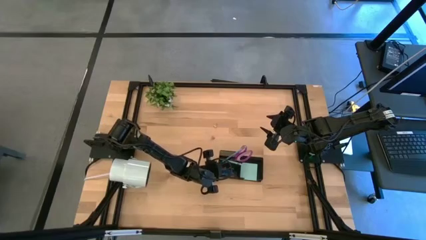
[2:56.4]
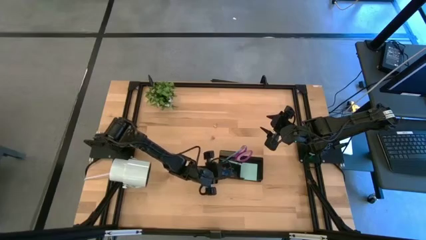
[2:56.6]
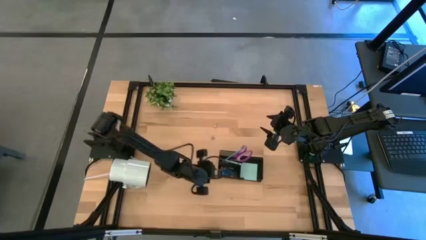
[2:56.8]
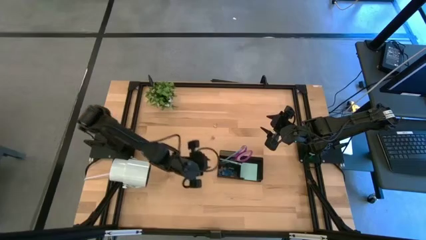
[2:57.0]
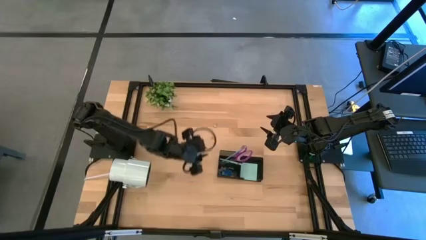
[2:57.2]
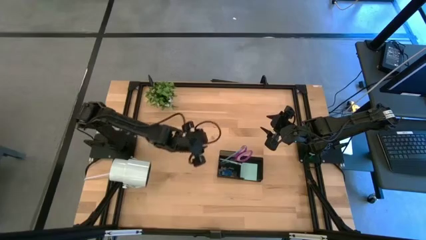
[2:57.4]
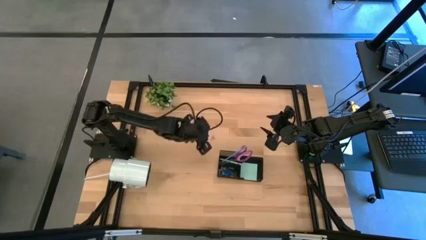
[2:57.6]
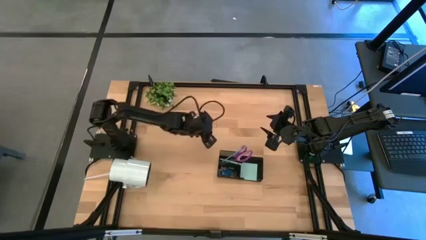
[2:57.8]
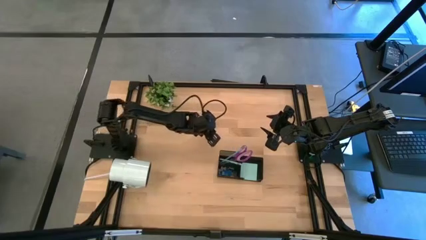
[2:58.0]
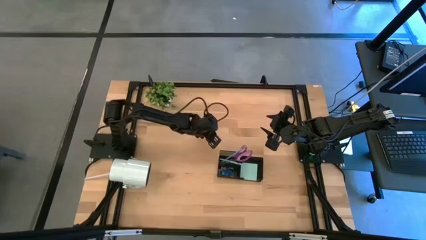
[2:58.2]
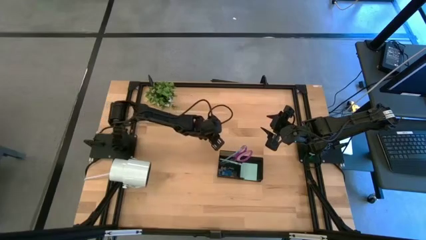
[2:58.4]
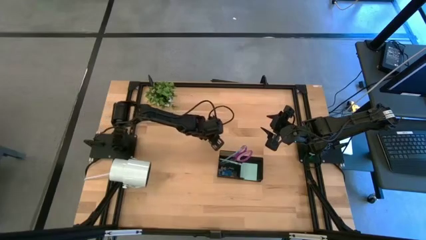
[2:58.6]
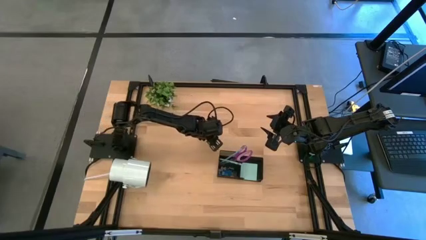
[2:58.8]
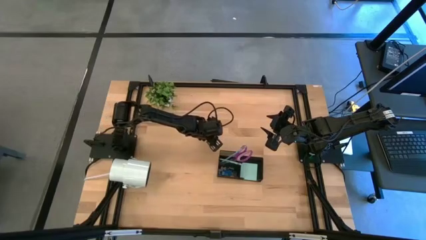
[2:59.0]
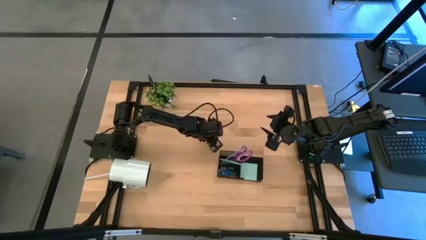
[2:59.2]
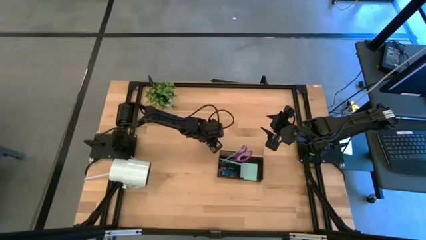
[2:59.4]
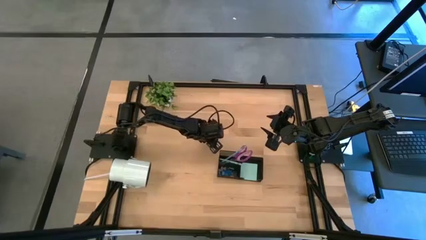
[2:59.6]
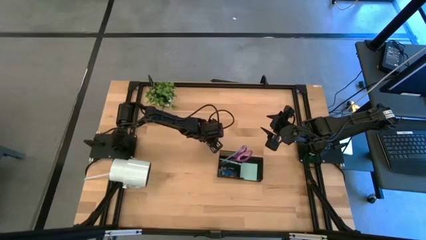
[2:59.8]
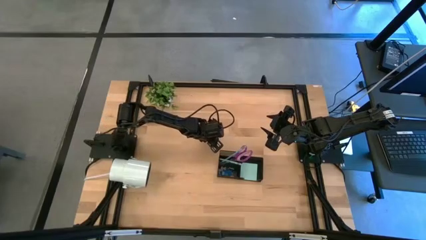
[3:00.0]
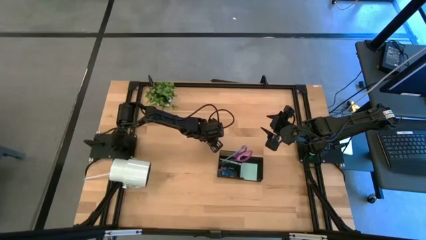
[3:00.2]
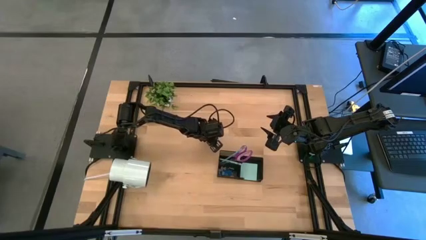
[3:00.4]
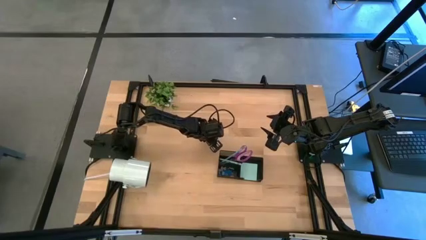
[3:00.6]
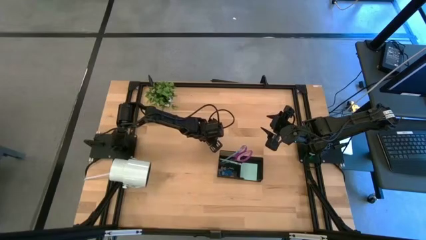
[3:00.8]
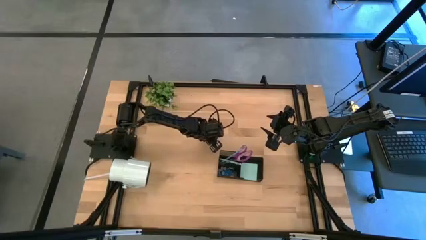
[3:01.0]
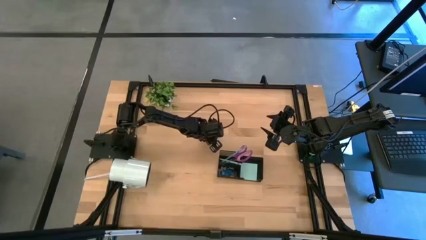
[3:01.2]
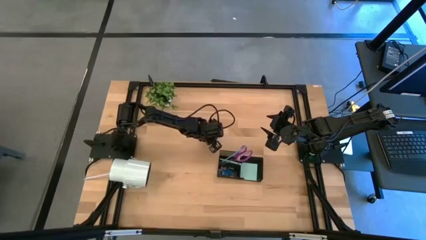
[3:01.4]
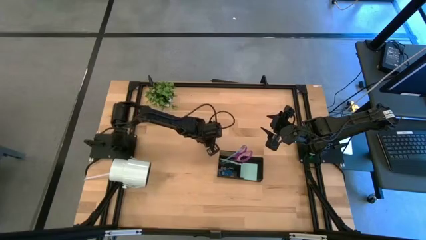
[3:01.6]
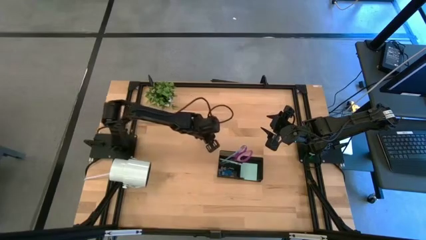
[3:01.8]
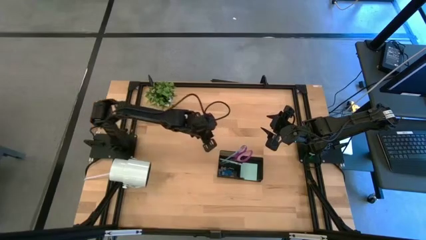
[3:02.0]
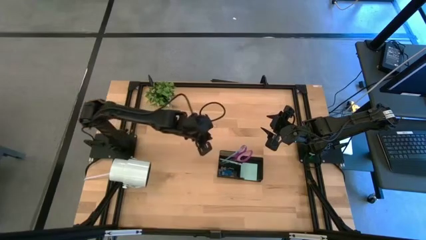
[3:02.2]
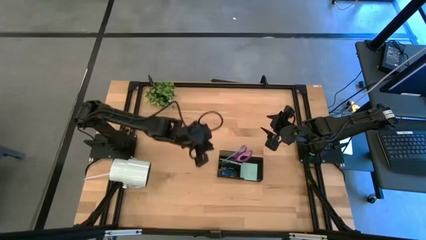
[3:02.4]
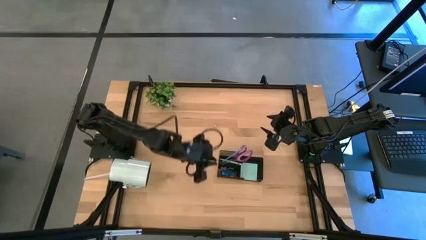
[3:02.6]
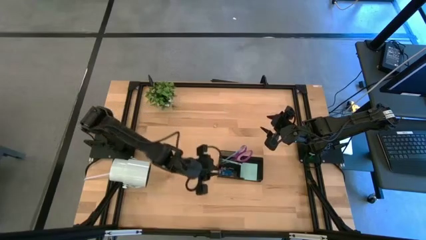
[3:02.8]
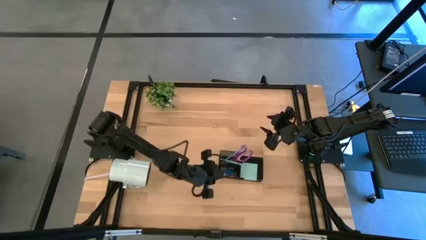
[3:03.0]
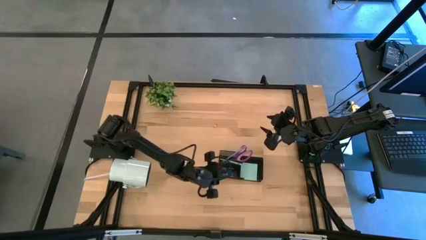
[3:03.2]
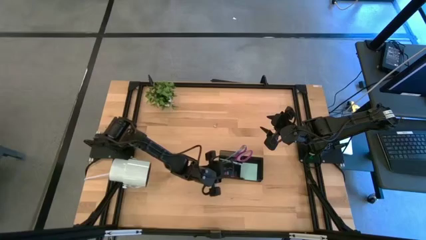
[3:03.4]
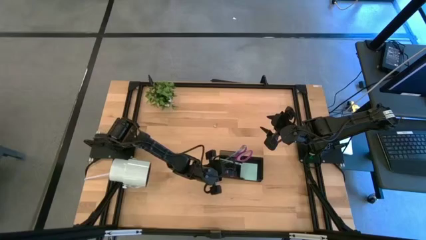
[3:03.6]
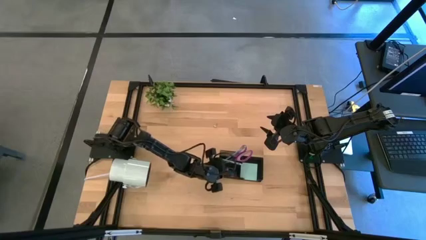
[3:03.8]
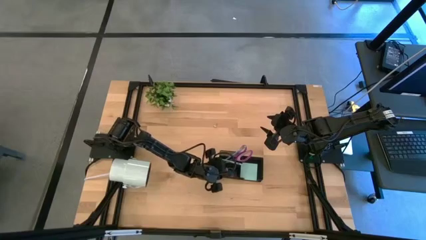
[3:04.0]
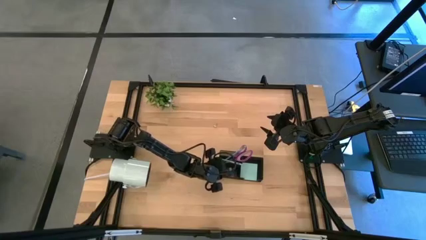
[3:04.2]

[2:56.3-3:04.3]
Task: Pick and place office supplies into organizer
Put the pink binder clip into the desk organizer

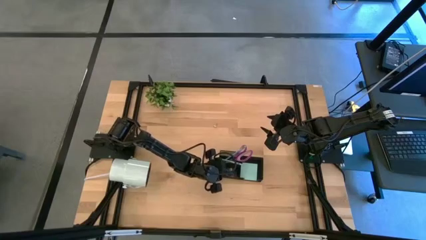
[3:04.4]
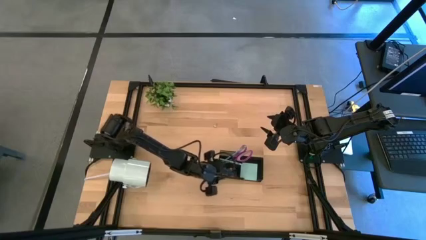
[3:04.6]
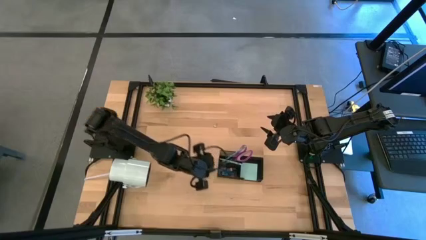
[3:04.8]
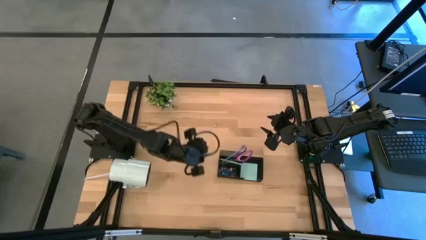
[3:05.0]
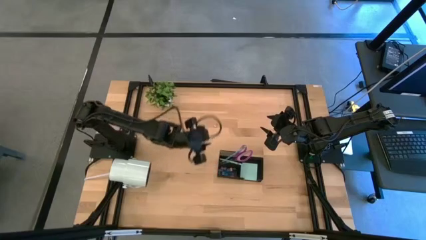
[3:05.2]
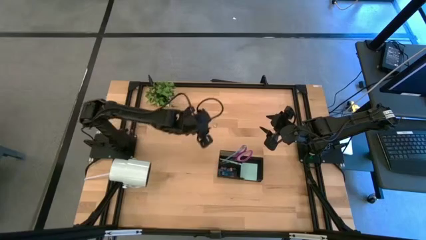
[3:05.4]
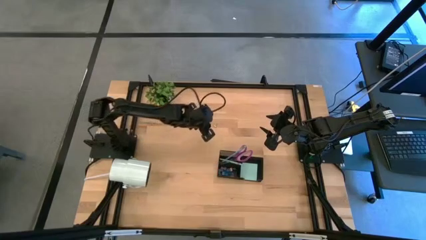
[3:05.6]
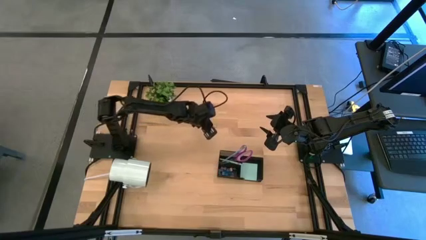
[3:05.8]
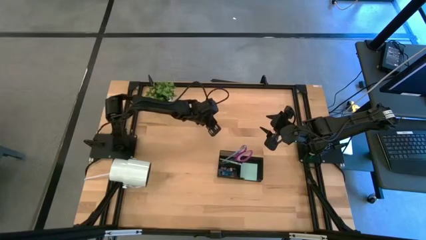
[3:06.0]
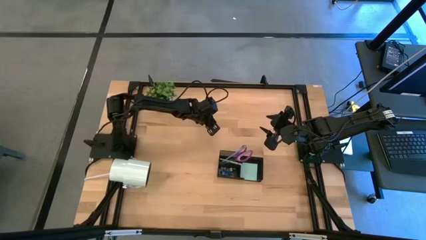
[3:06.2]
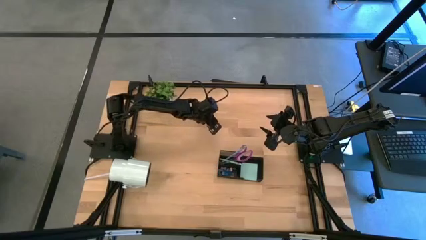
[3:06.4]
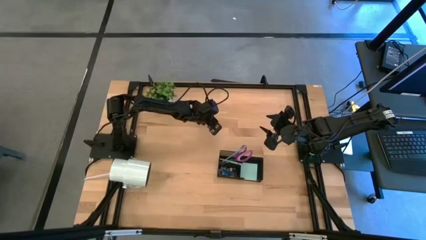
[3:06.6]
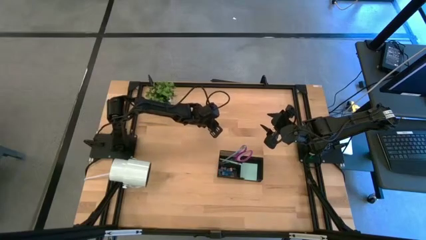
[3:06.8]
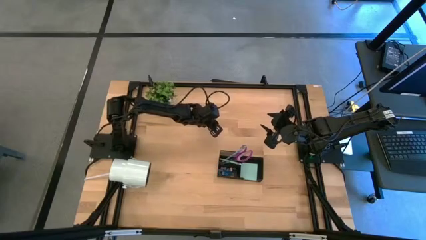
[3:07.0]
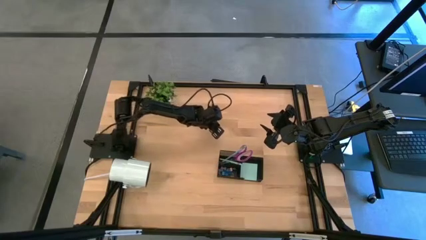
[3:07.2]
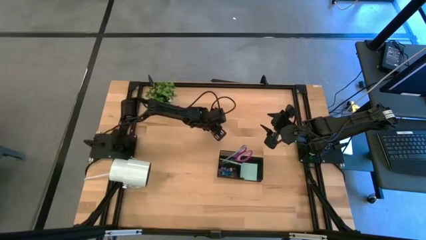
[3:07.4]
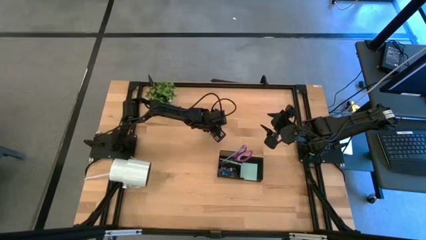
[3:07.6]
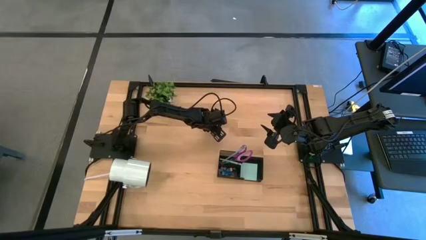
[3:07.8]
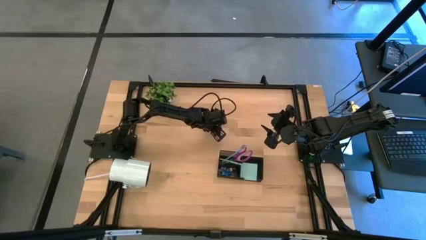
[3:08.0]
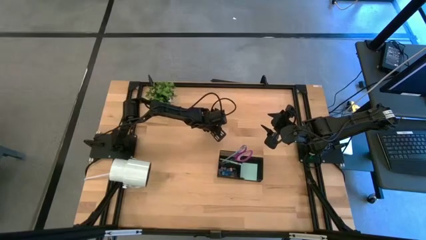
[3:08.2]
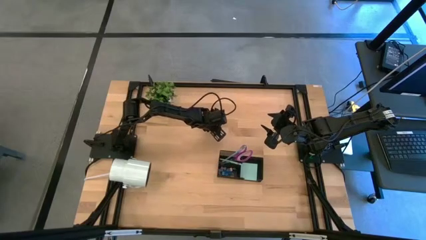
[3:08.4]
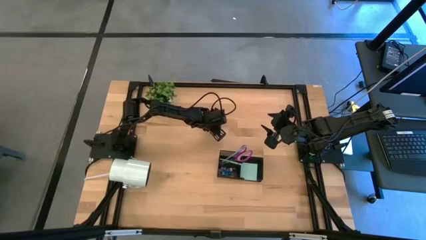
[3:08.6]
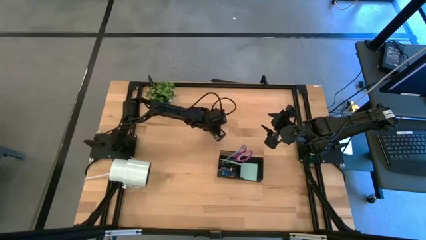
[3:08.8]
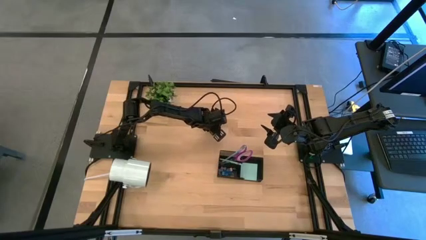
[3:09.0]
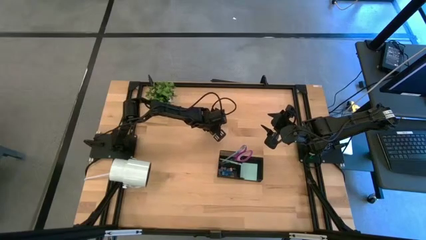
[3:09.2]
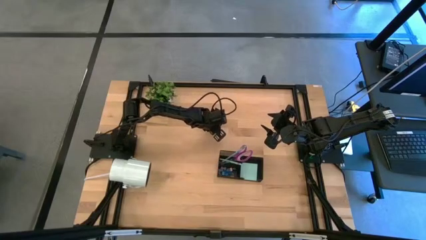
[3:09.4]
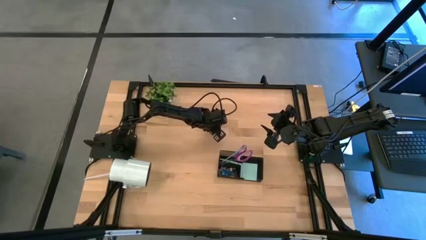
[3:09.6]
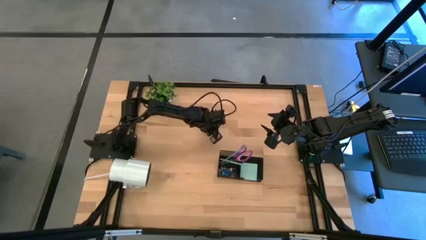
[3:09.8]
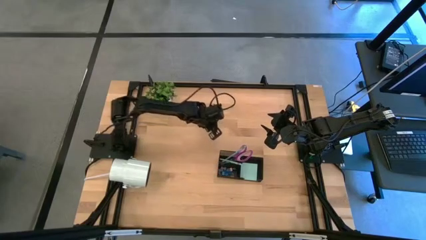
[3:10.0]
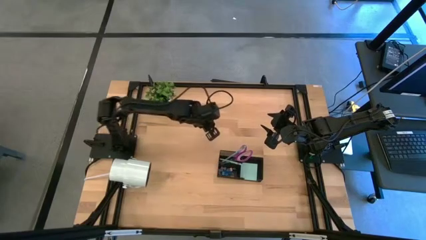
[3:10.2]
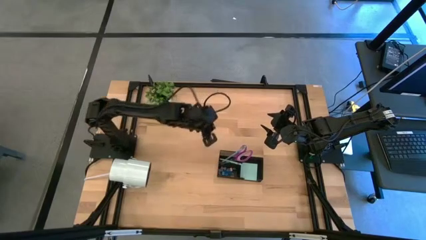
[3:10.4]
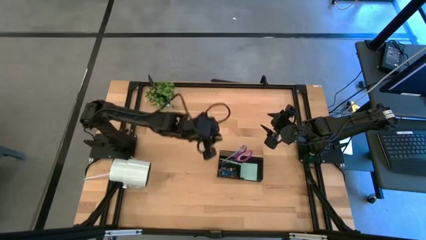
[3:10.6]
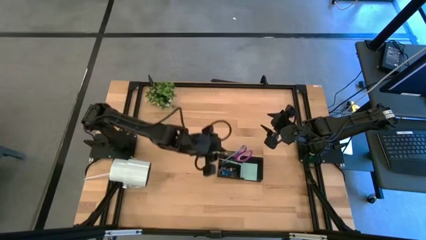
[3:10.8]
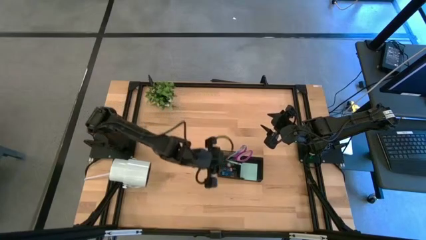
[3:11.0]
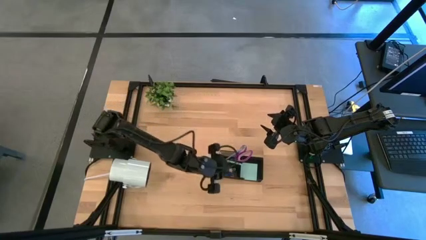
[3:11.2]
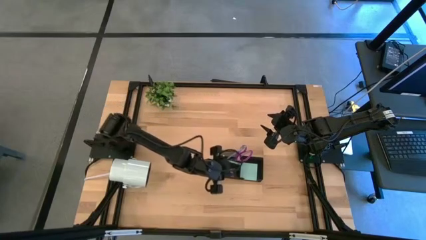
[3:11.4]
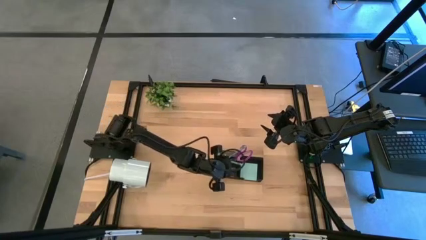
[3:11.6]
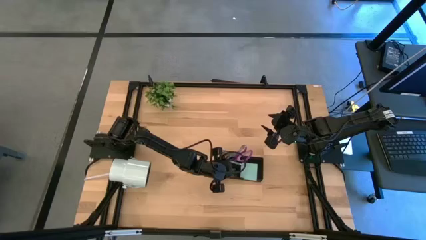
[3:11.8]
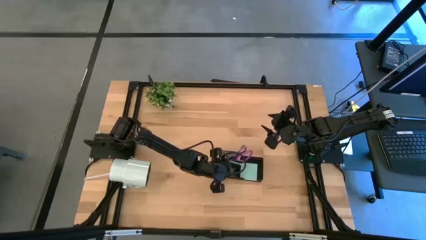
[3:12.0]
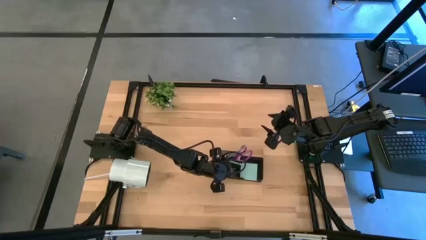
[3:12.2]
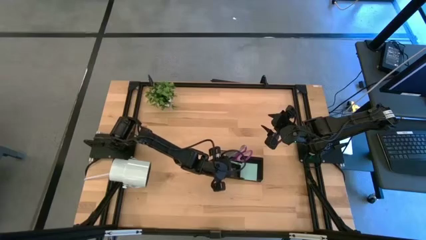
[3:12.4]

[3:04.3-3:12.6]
Put the golden binder clip into the desk organizer

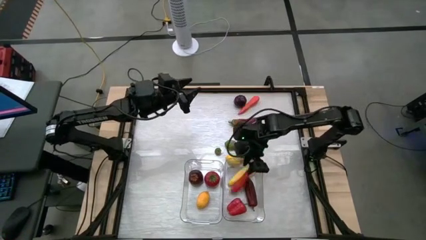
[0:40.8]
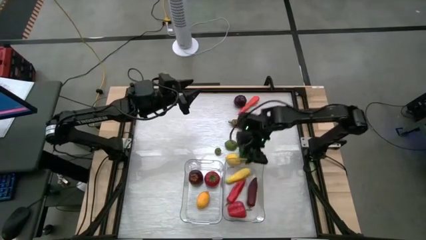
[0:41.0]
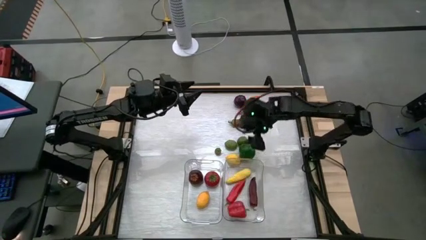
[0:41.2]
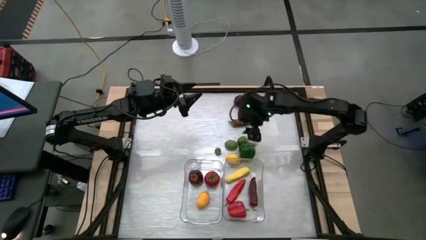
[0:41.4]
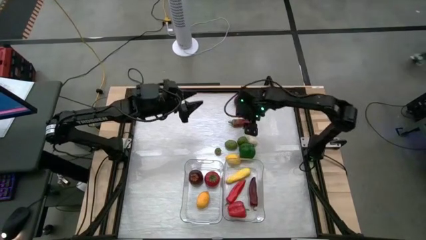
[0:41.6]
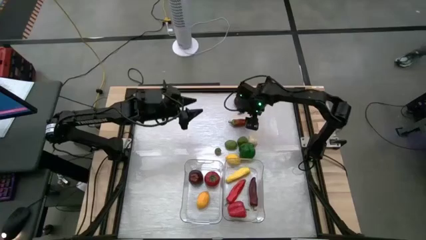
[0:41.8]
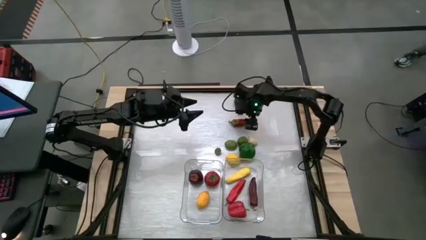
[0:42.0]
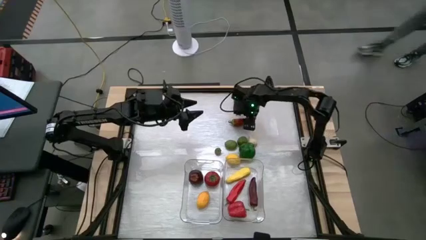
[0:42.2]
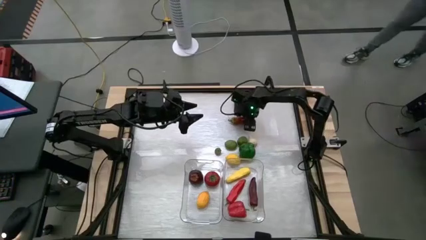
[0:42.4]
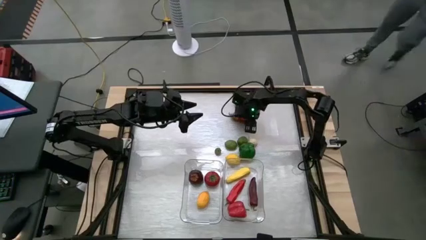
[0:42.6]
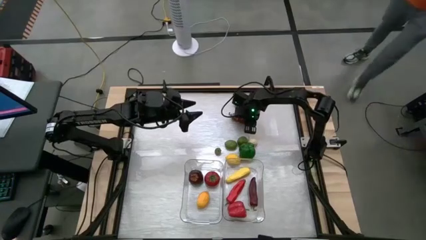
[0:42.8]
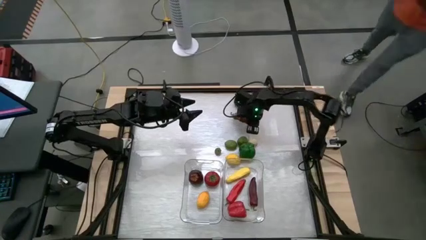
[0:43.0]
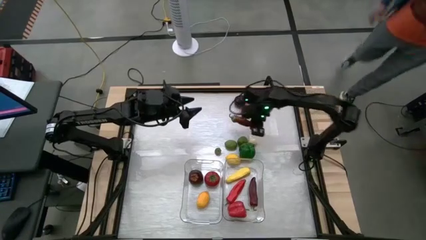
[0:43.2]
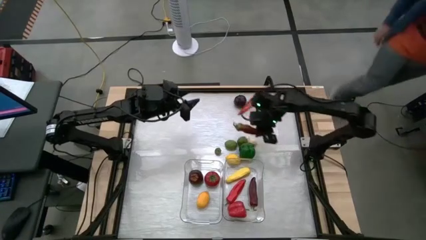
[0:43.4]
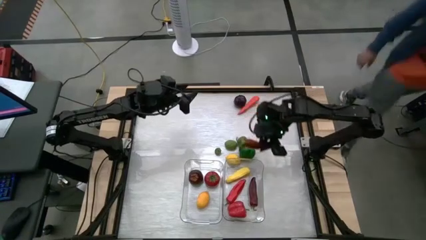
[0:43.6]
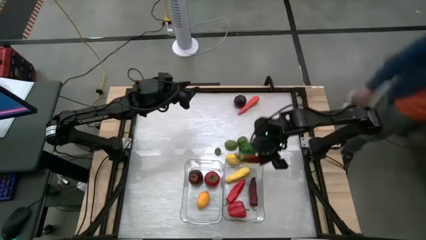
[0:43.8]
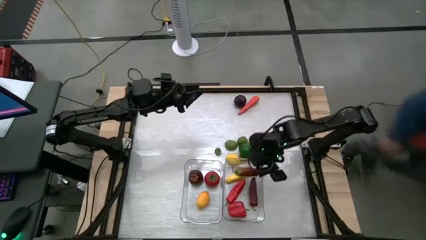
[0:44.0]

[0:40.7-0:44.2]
Task: Sort produce into baskets
Put the dark red chili pepper into the right transparent bin
